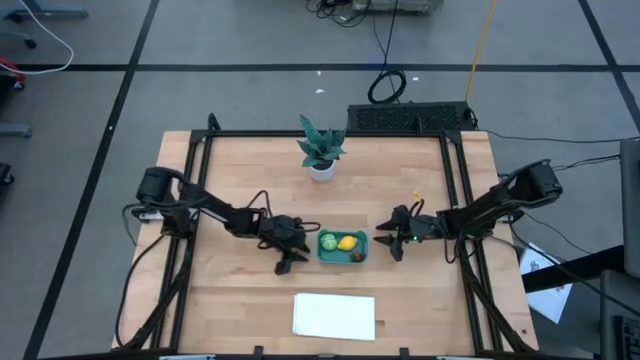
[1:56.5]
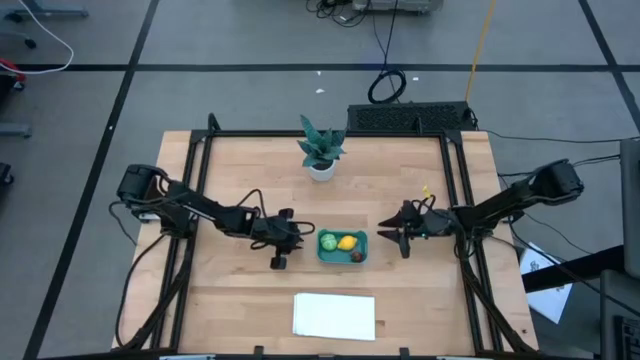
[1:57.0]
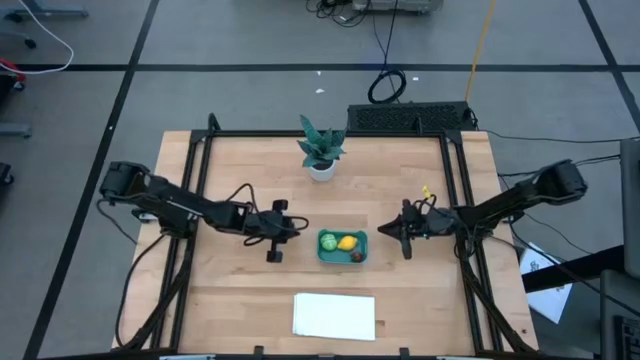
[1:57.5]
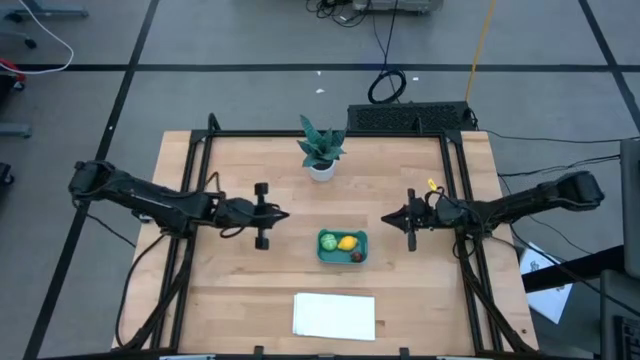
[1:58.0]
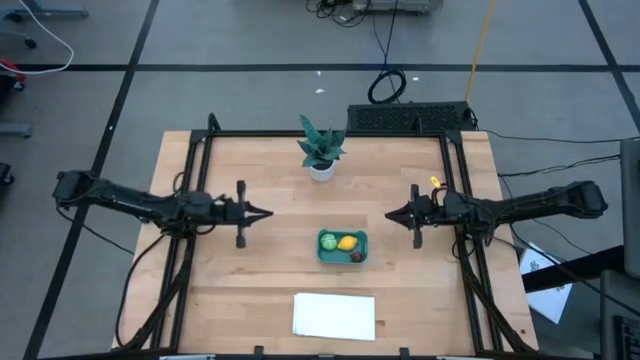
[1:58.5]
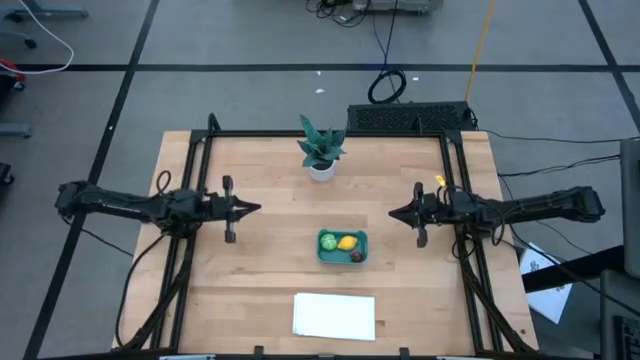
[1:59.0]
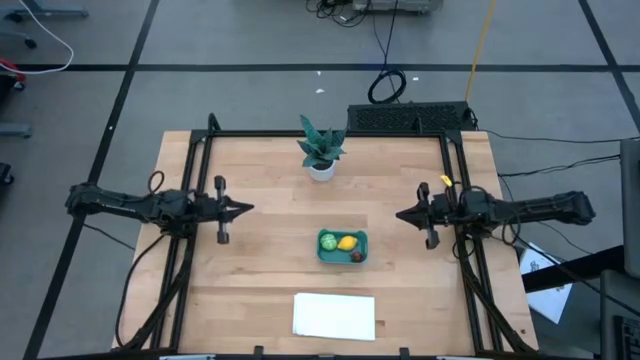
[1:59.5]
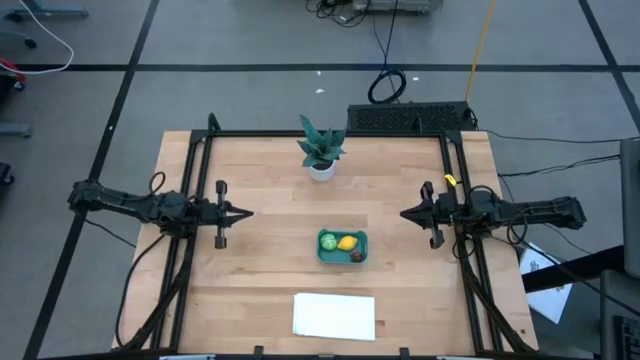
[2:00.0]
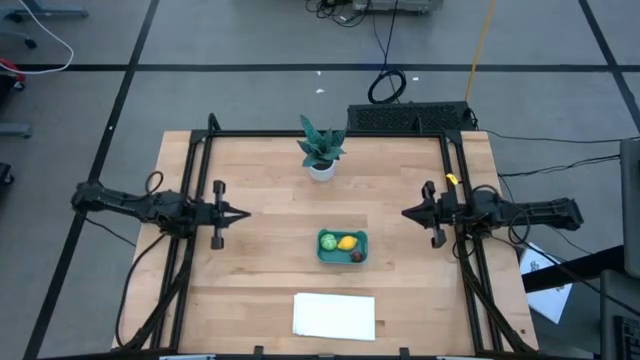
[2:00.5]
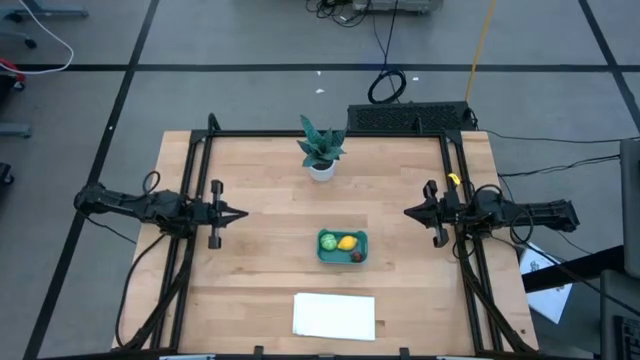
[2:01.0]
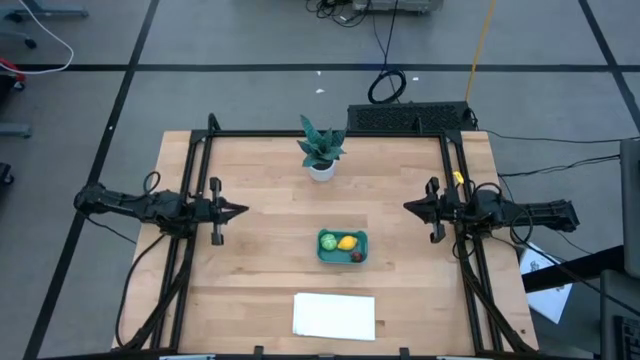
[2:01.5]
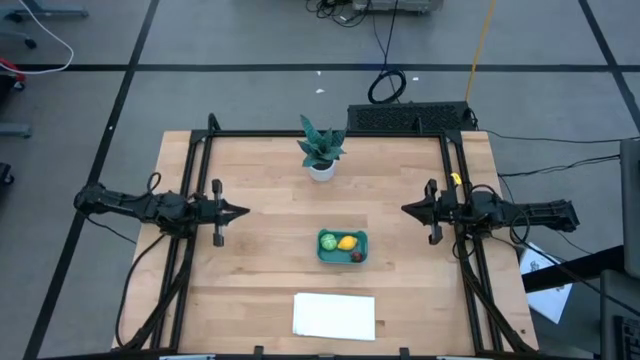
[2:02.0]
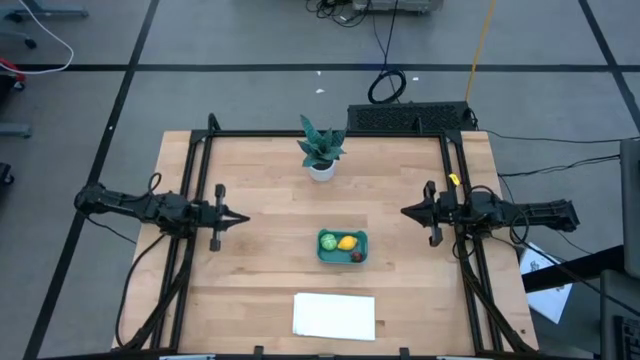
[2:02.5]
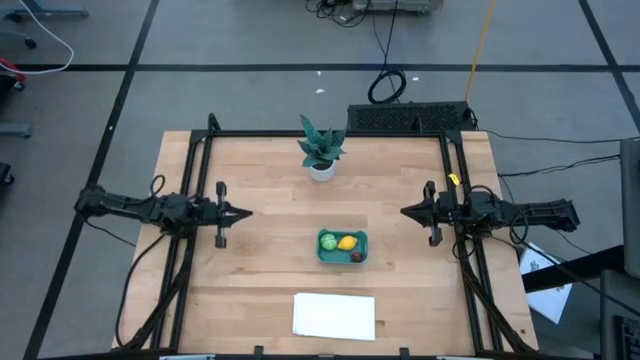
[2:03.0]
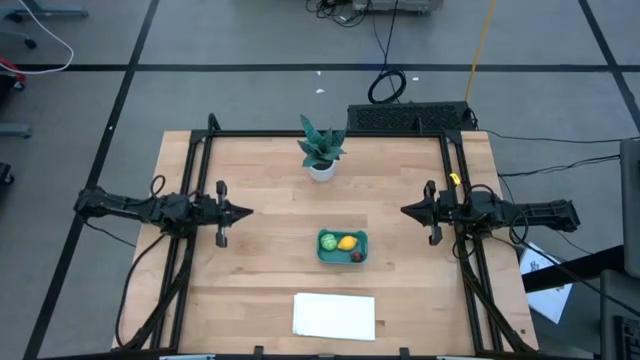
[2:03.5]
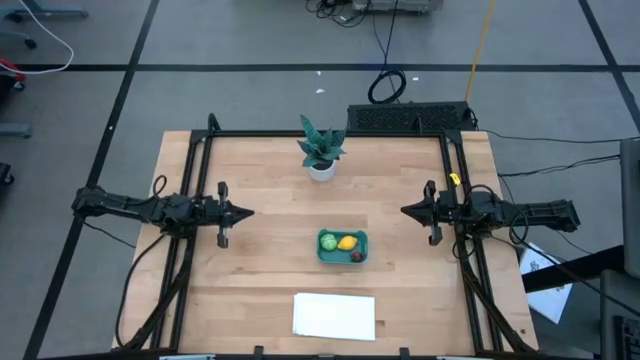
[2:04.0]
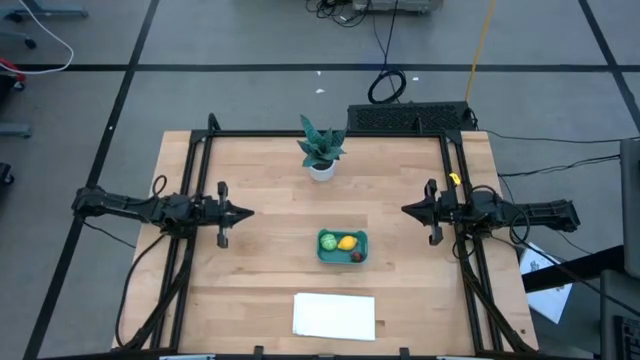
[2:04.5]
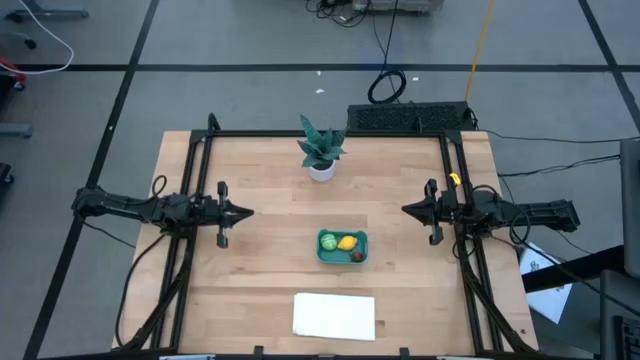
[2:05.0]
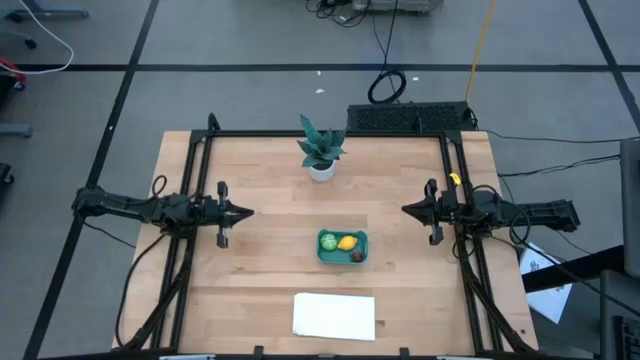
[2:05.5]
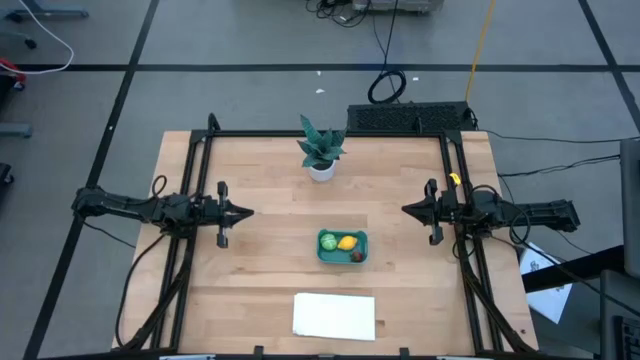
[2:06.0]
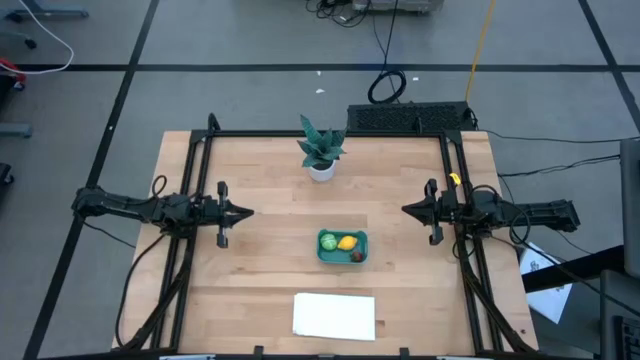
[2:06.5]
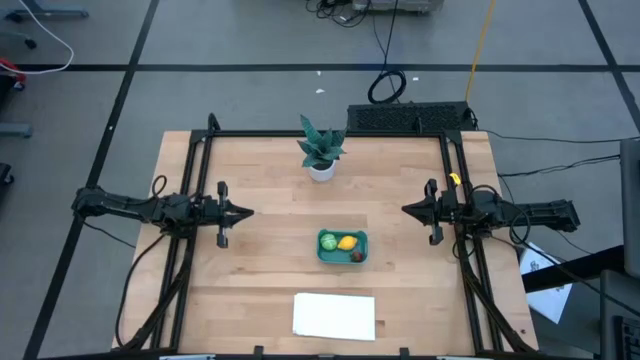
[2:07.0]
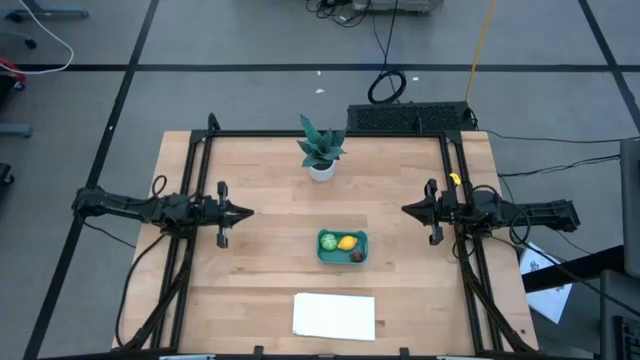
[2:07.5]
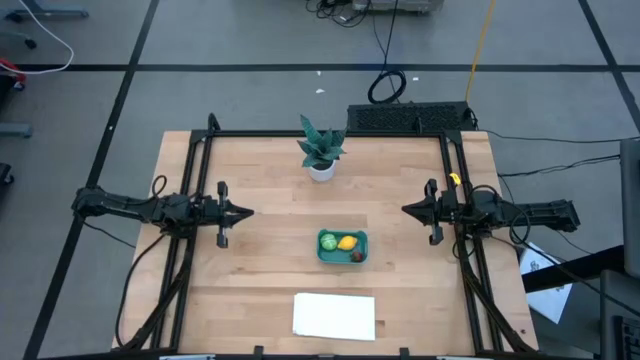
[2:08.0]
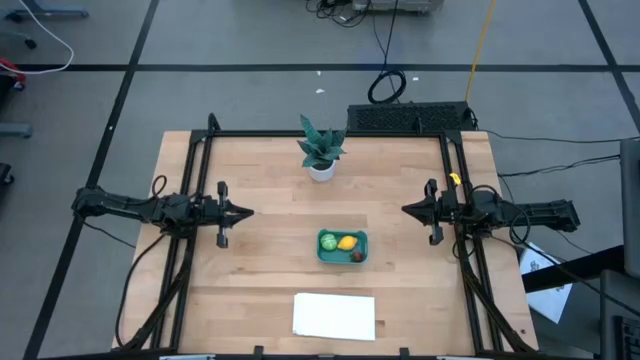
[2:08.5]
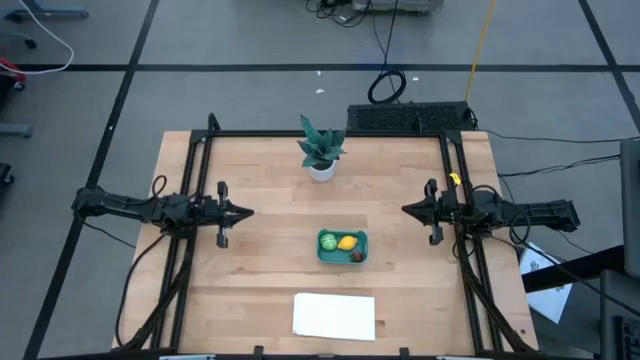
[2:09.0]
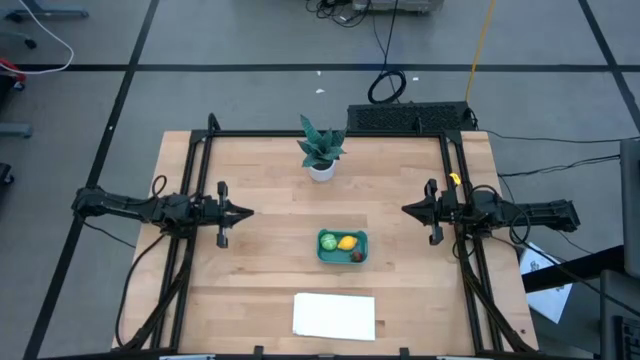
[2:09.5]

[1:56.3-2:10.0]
Task: Pick and placing Produce into tupperware
Return to Home Position

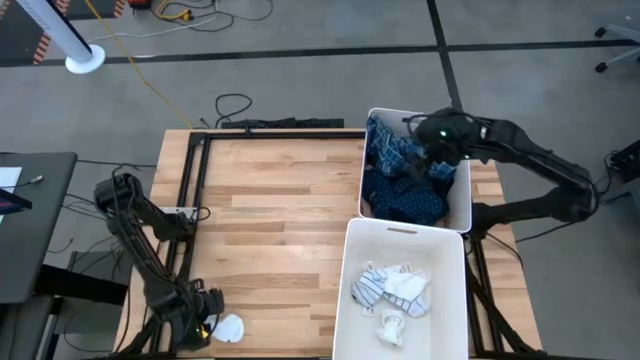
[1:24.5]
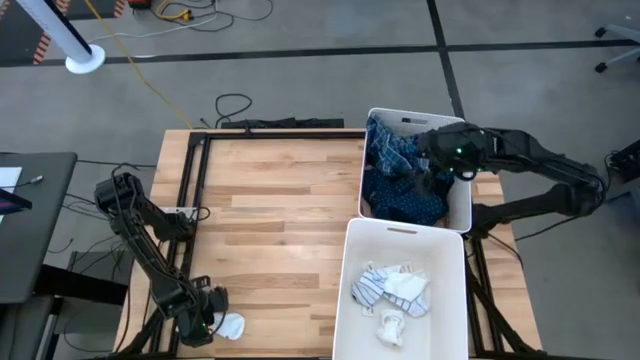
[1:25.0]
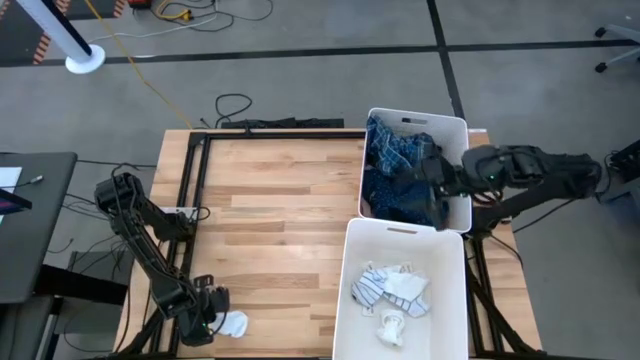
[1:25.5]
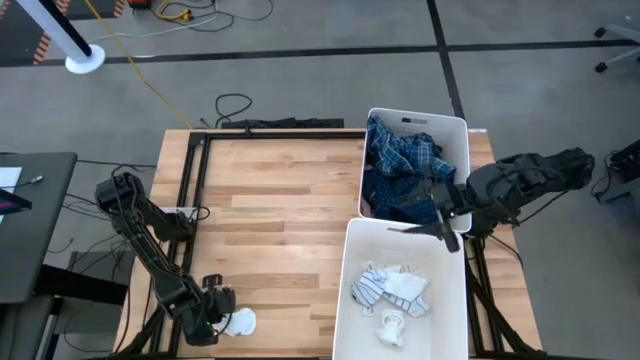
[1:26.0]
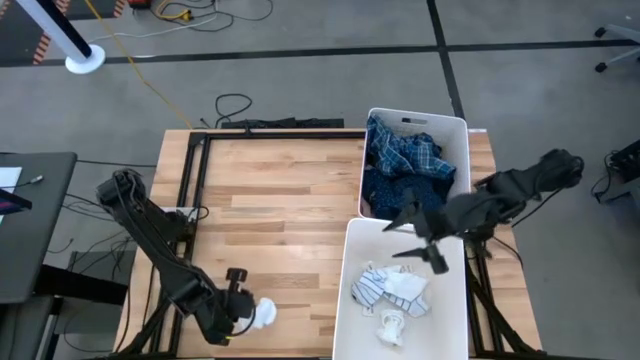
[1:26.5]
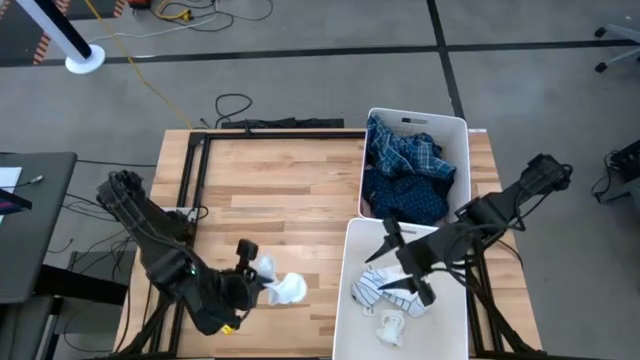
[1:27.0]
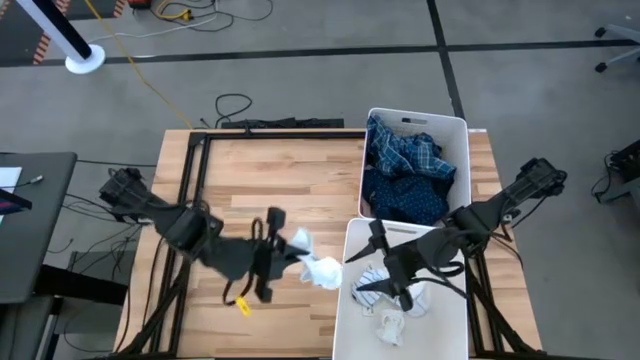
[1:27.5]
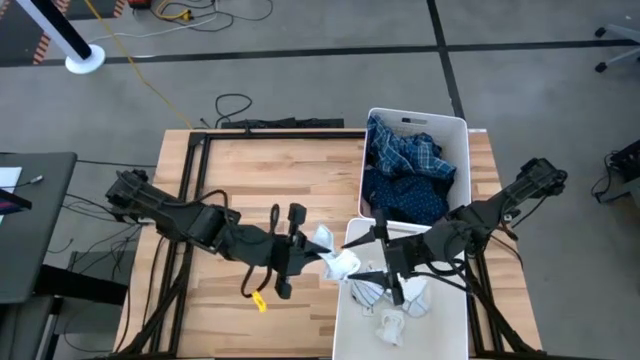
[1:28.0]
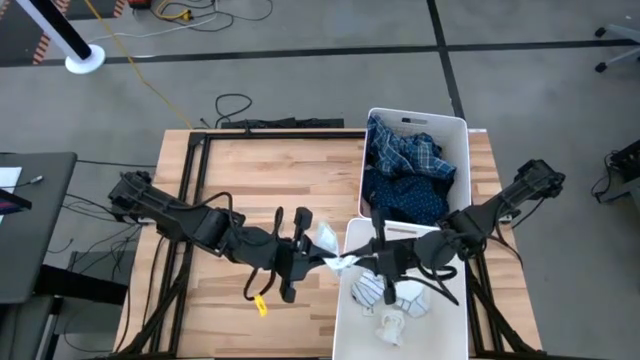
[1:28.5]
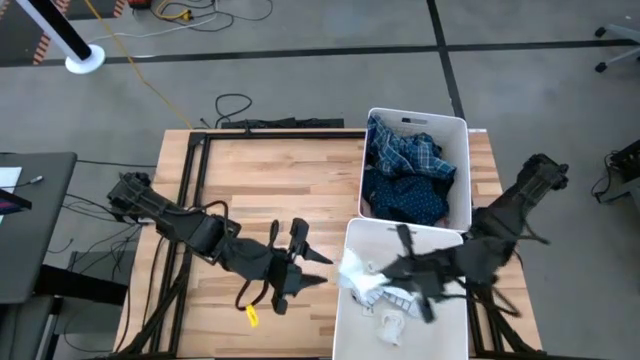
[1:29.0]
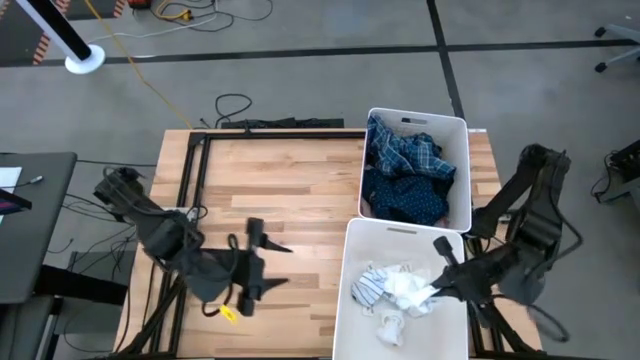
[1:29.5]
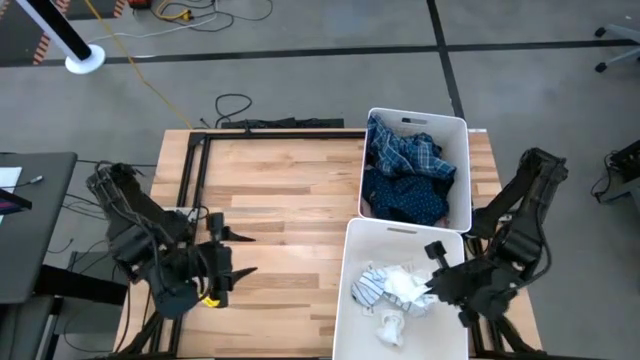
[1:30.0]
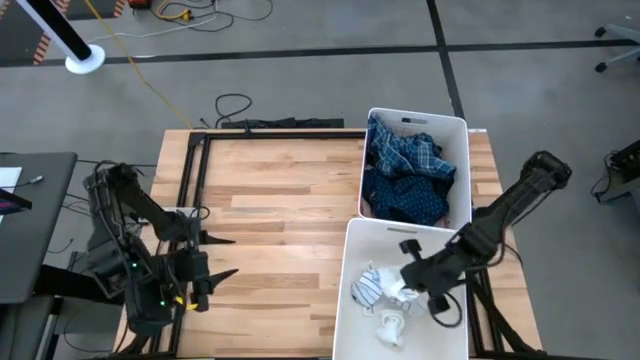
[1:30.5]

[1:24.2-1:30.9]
Task: Sort clothes
Put the white sock into the bottom laundry bin

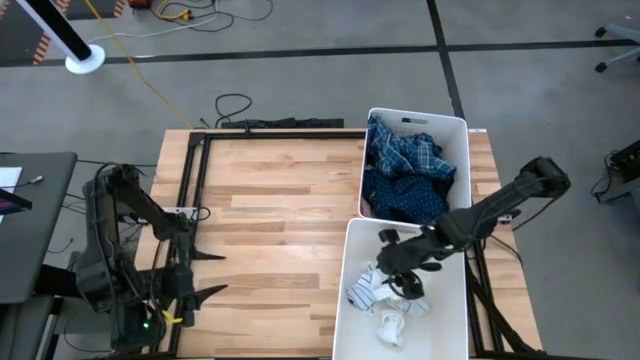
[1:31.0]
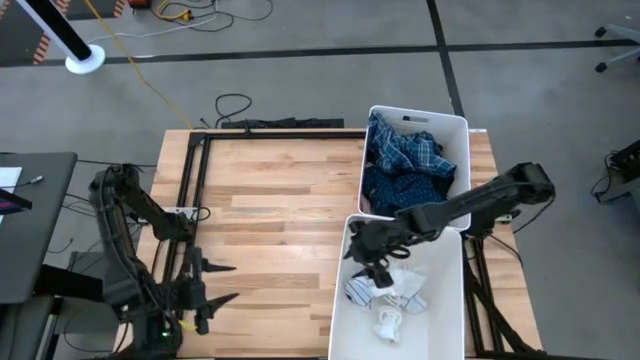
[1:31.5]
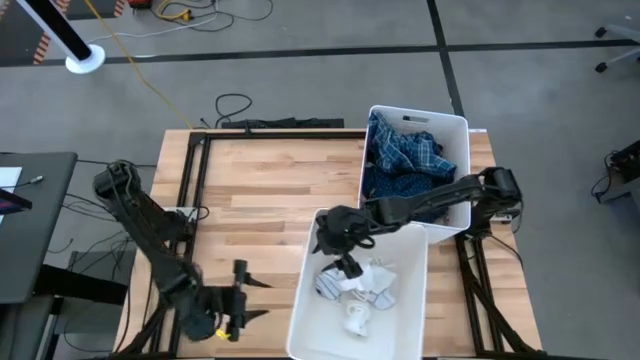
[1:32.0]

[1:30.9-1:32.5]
Adjust the bottom laundry bin
